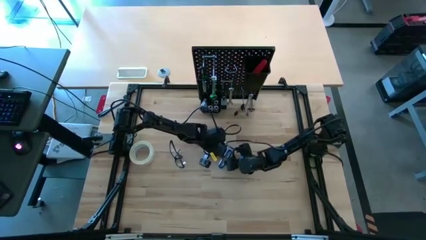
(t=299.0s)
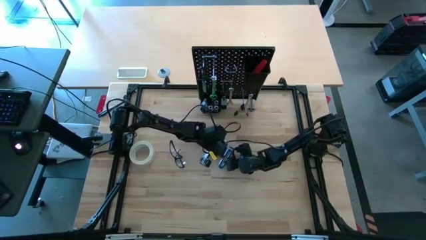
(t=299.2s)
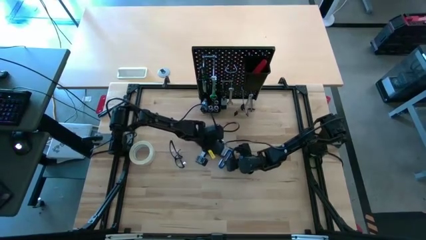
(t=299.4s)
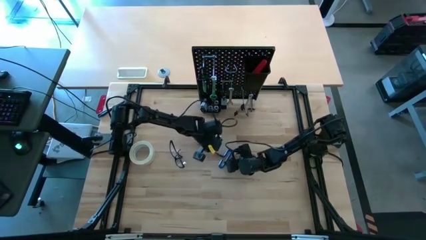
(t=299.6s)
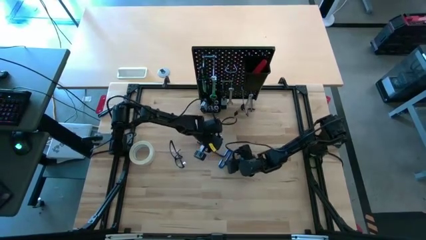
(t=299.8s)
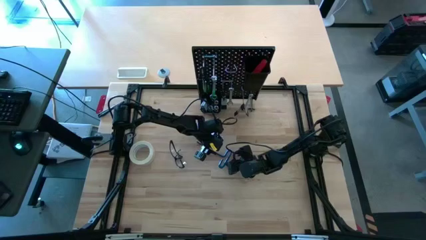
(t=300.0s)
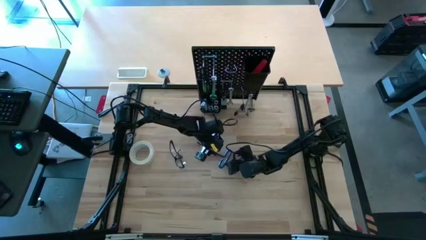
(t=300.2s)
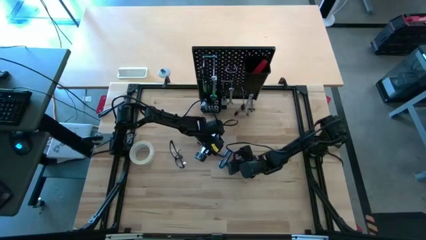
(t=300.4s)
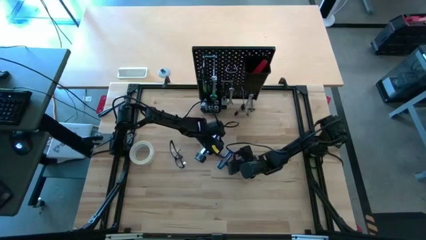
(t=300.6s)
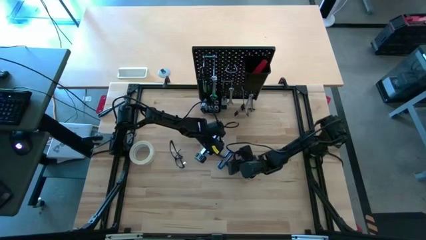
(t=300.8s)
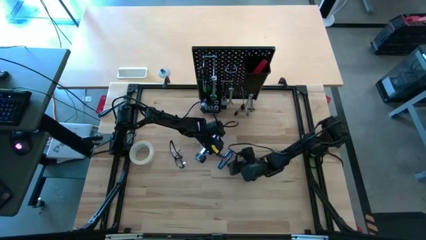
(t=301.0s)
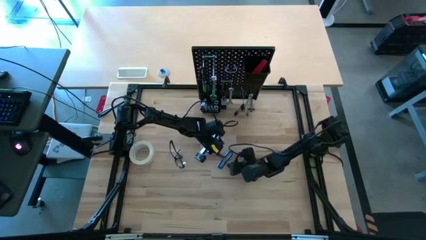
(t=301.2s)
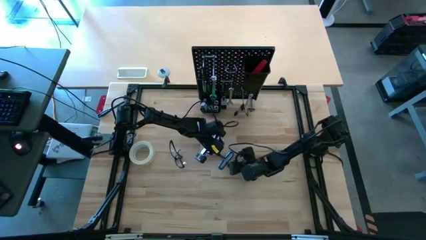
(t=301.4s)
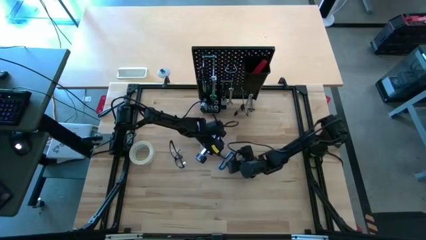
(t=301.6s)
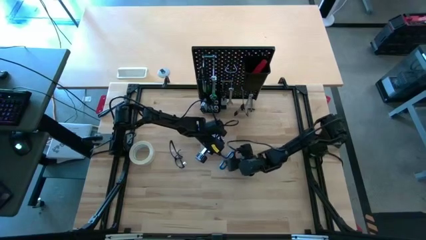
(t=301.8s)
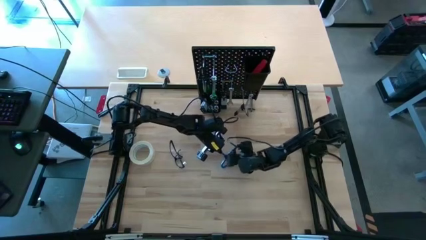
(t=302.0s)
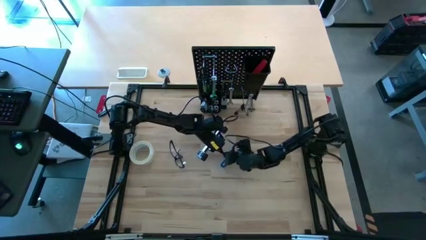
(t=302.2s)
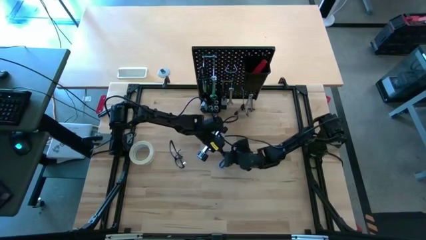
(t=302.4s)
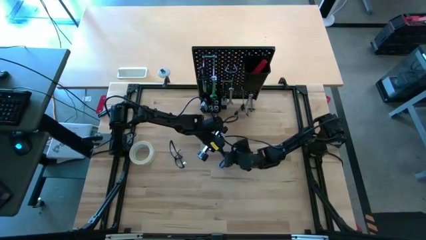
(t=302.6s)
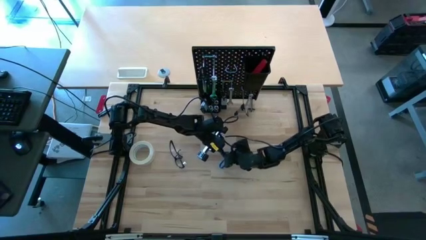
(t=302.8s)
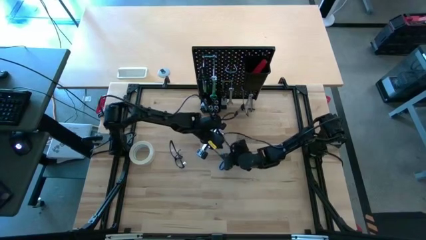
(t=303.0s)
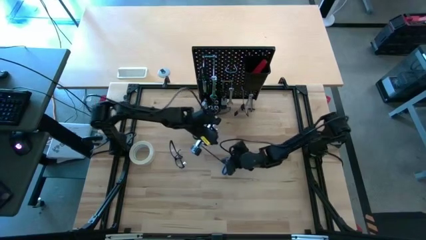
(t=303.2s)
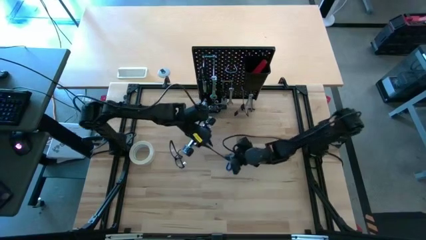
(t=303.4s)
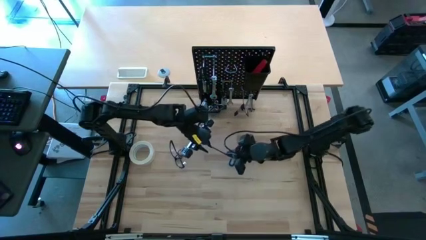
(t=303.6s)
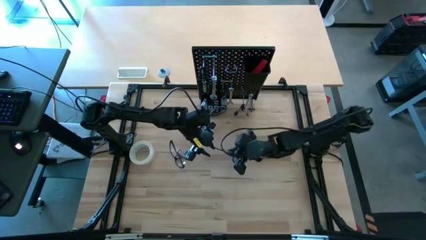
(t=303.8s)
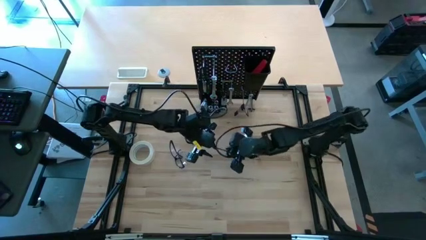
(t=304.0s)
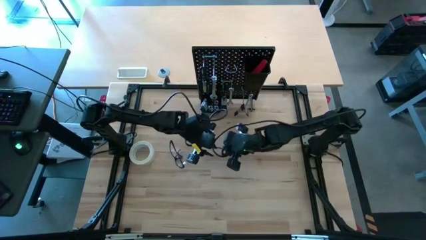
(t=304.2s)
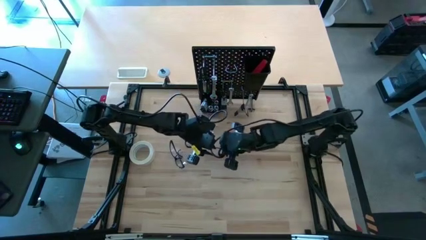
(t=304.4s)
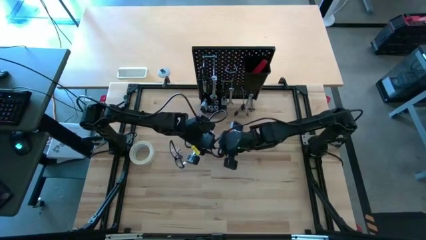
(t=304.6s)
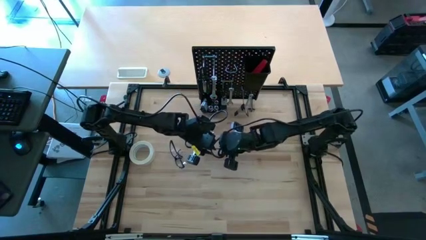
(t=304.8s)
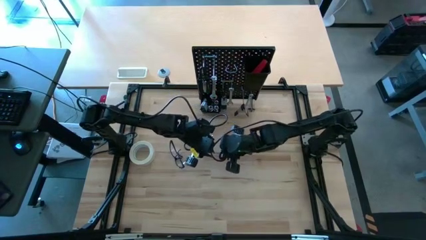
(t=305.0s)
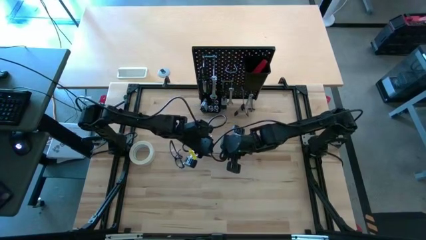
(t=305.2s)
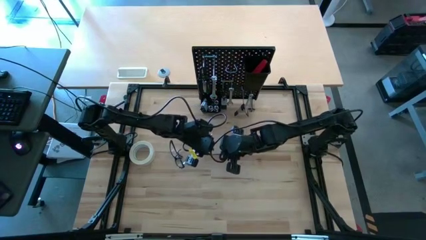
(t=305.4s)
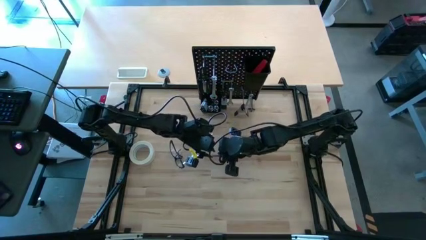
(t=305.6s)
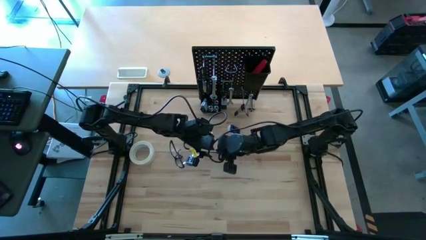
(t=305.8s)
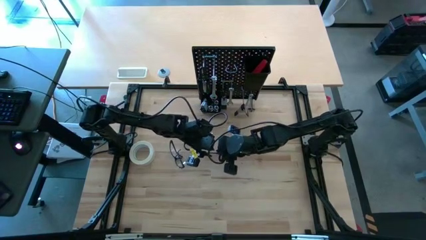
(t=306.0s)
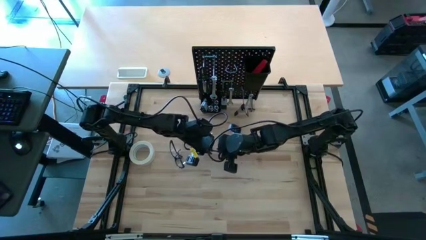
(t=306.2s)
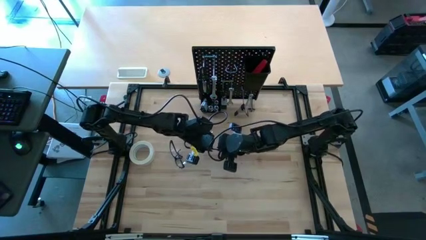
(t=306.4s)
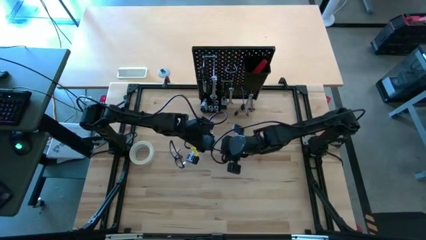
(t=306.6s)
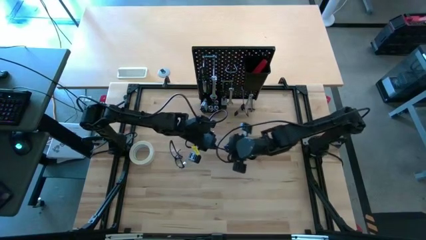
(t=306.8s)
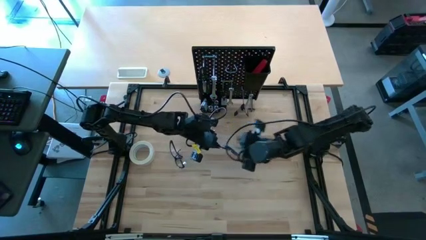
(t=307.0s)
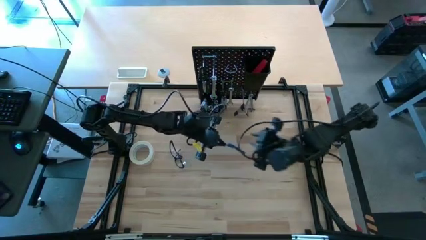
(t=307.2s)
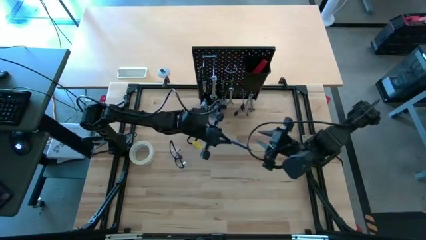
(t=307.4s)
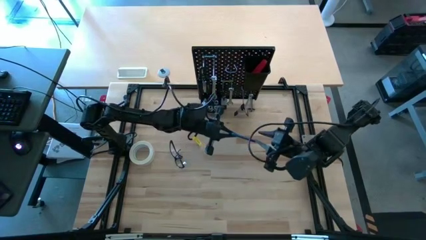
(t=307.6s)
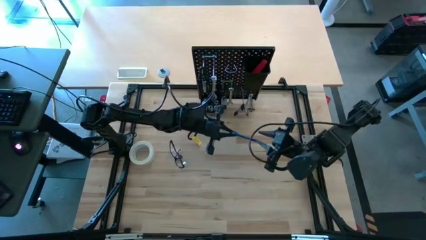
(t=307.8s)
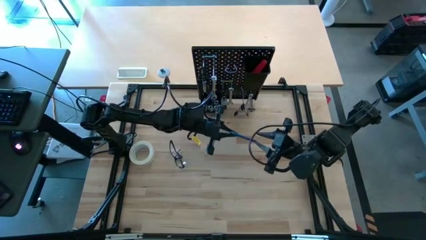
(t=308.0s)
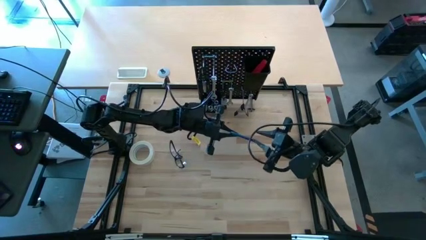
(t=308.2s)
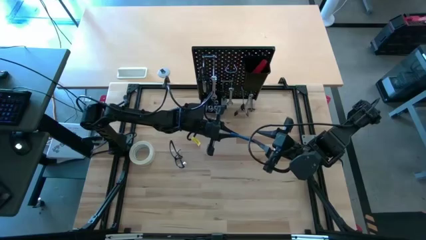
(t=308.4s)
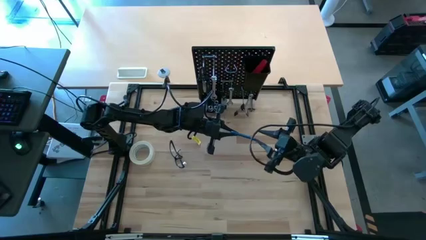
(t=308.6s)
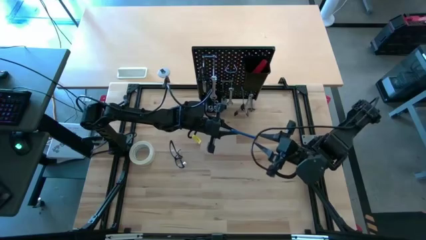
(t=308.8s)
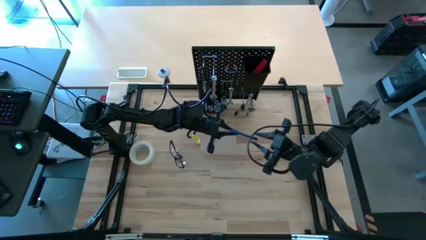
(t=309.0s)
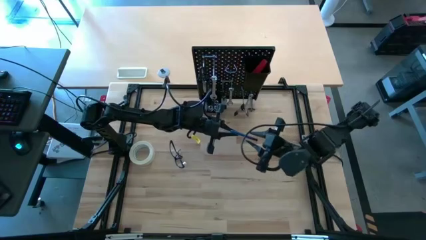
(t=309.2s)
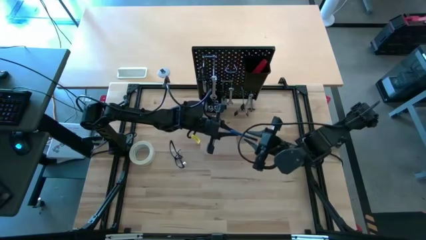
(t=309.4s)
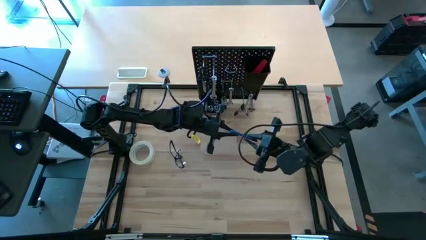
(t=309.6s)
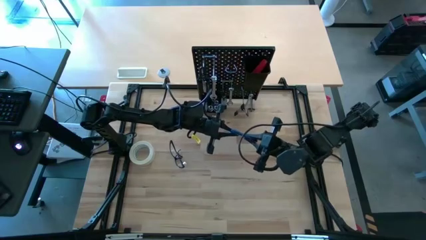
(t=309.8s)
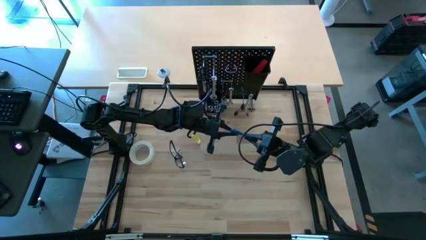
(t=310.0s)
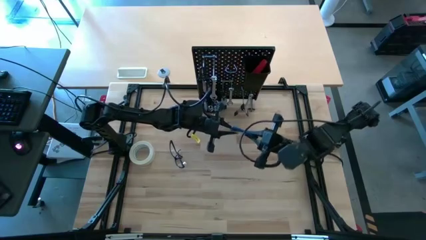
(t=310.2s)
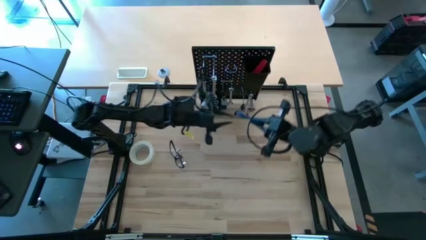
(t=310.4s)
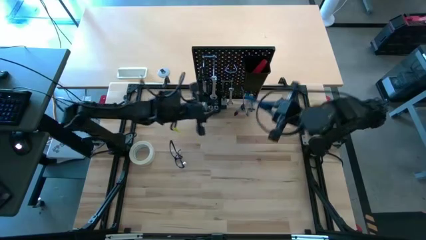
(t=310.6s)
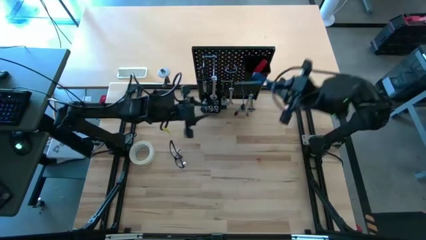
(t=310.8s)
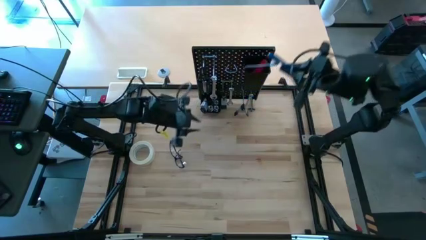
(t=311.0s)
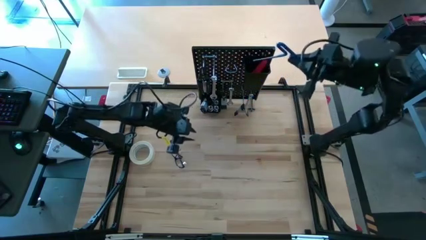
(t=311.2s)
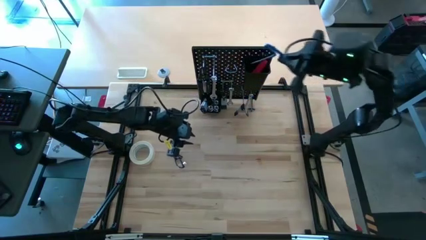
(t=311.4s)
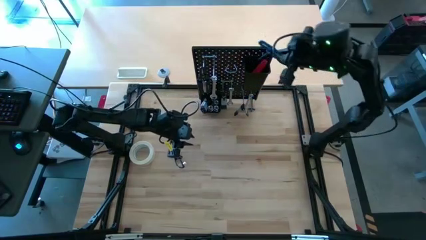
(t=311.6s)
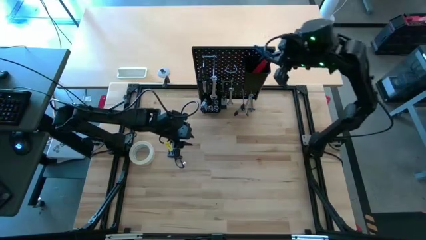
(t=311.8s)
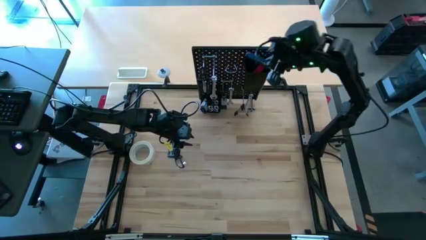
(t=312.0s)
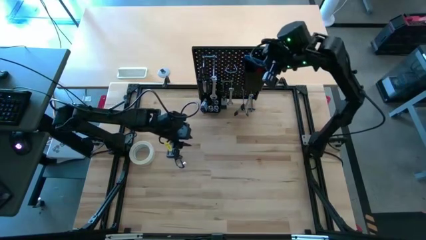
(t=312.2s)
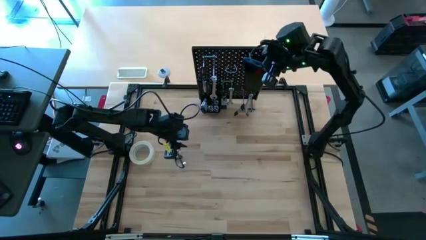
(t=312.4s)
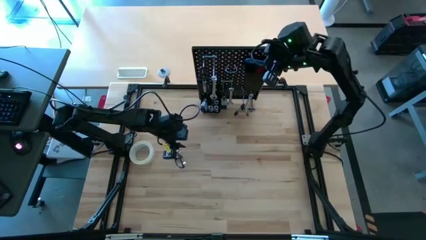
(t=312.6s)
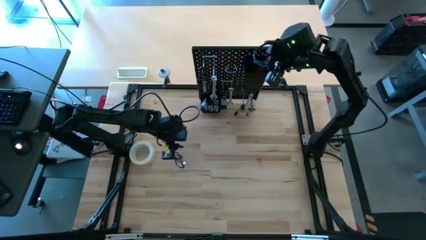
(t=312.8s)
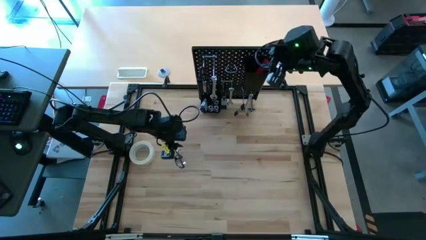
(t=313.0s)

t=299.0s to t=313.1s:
Task: Hang tools onto peg board
Put the pick tool onto the peg board

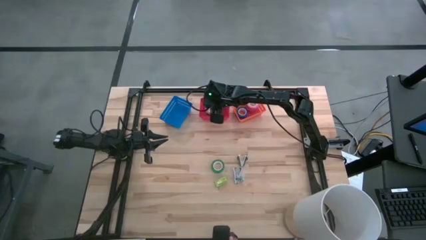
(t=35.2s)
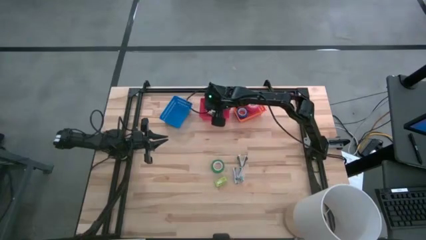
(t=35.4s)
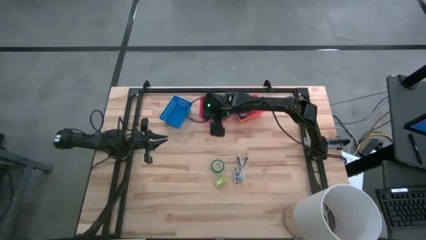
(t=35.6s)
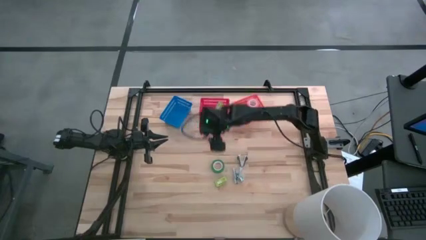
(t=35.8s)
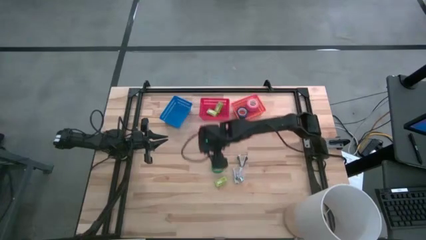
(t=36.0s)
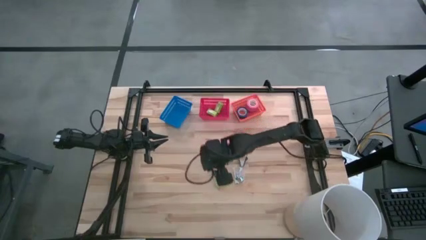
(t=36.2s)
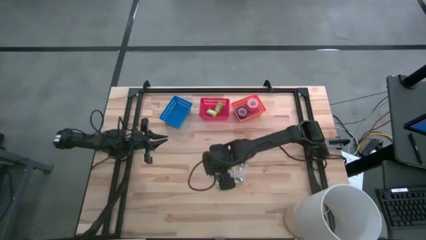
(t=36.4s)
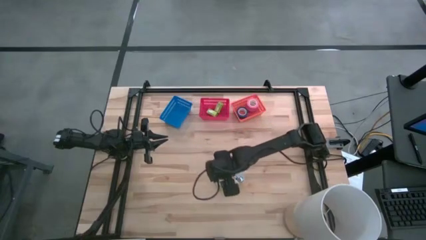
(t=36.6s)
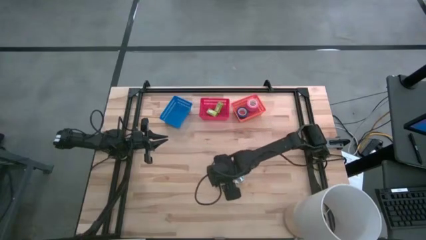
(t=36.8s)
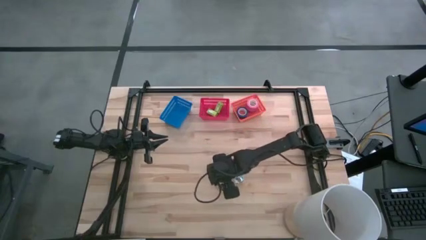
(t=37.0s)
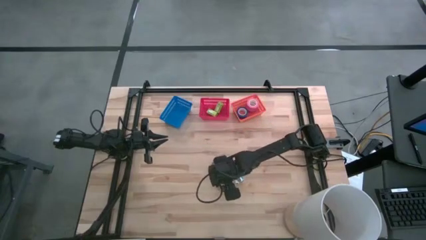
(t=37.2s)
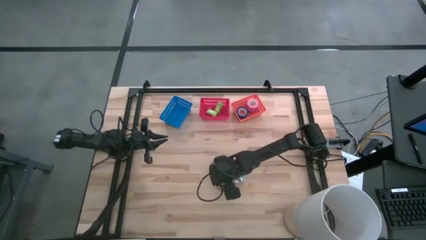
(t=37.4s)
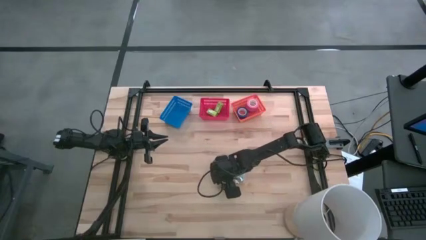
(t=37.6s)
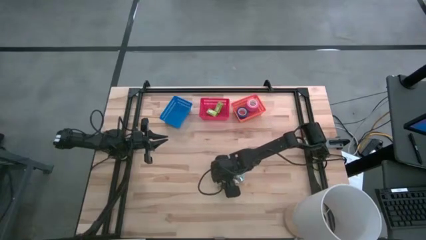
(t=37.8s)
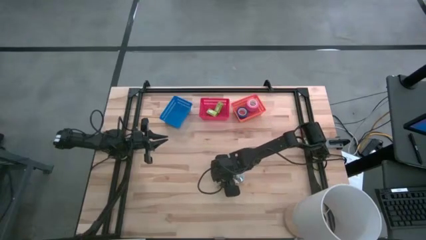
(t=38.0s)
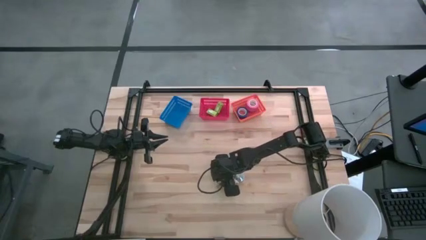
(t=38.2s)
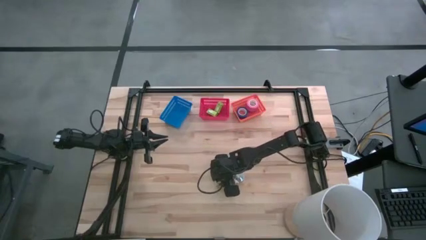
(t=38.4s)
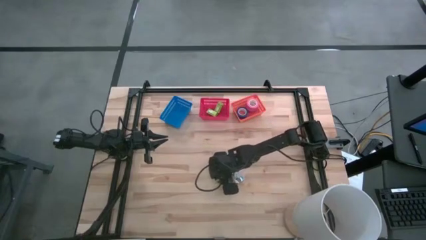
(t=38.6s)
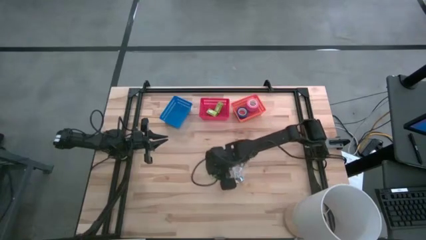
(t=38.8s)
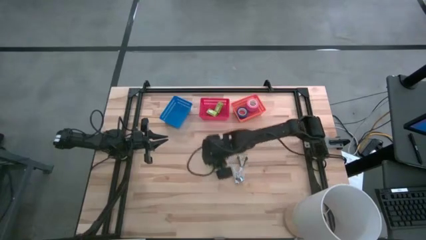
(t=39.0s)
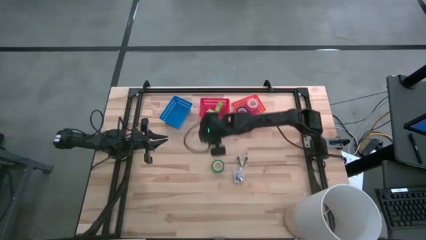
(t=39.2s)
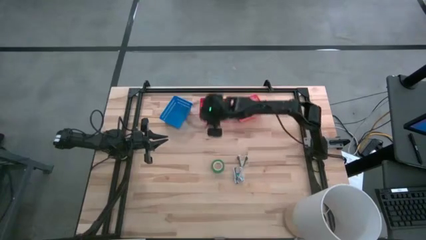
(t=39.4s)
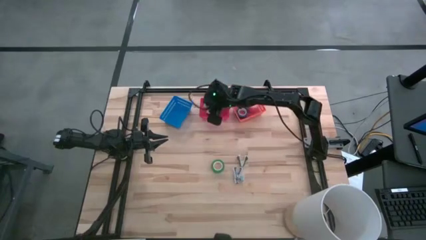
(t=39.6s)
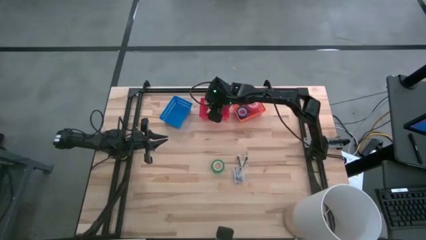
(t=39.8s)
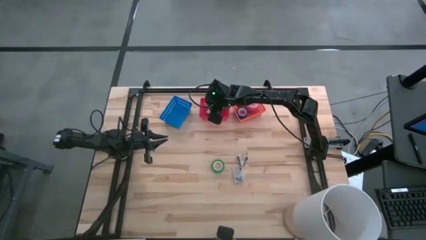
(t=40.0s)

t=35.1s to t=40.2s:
Task: Pick and place Stapler, Stapler remover, tape
Put the staple box into the red bin
